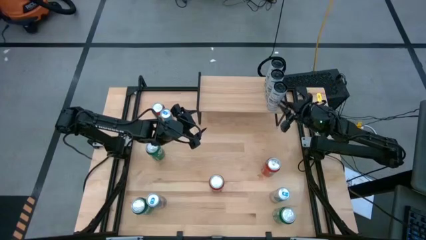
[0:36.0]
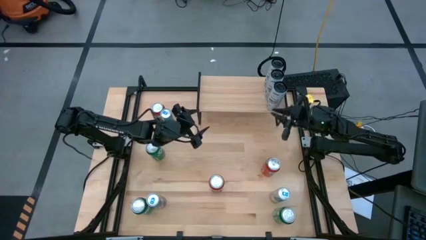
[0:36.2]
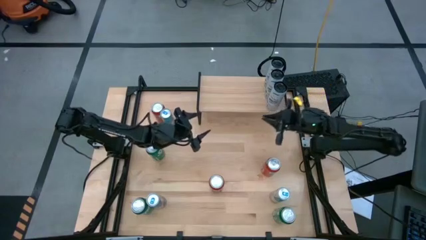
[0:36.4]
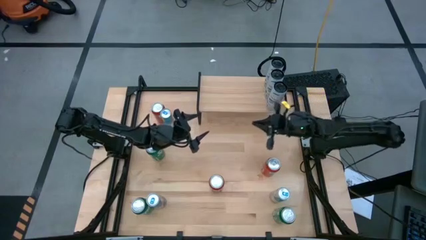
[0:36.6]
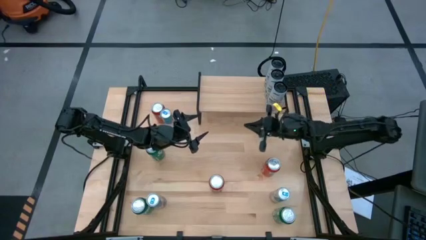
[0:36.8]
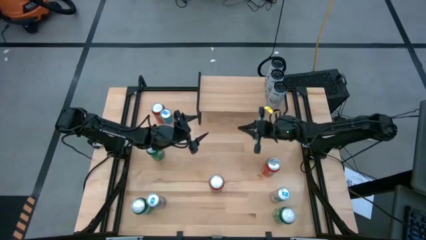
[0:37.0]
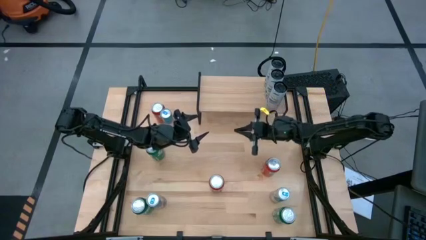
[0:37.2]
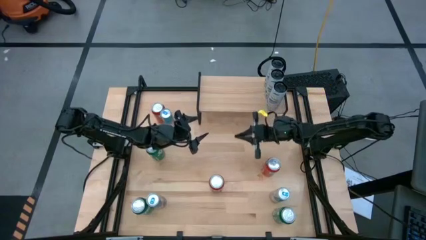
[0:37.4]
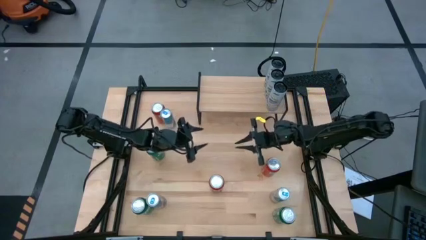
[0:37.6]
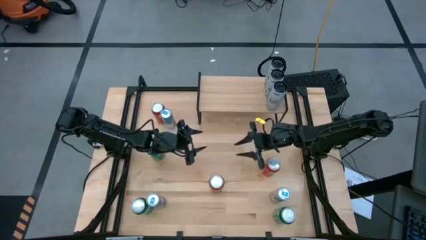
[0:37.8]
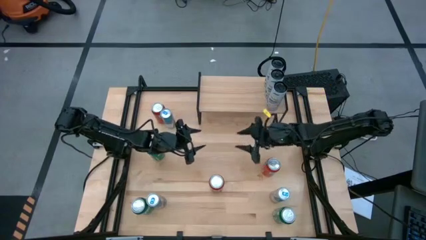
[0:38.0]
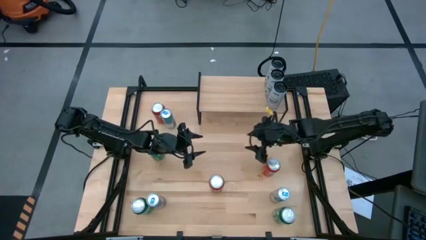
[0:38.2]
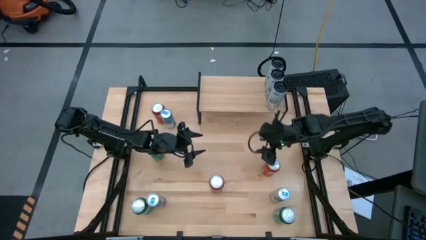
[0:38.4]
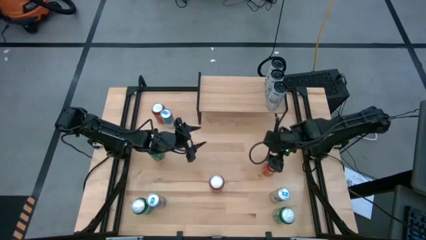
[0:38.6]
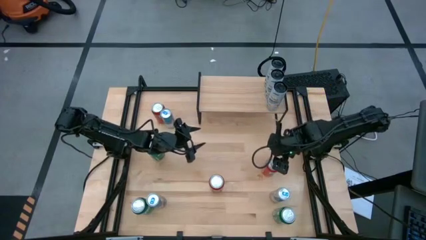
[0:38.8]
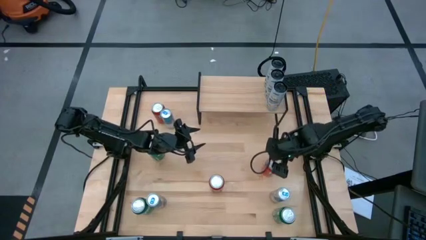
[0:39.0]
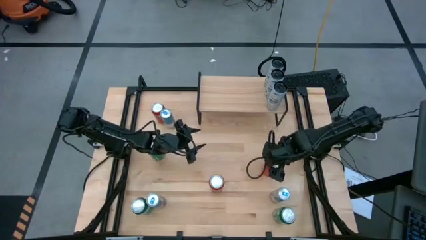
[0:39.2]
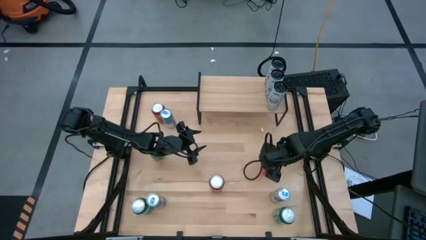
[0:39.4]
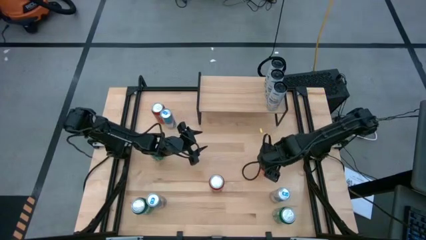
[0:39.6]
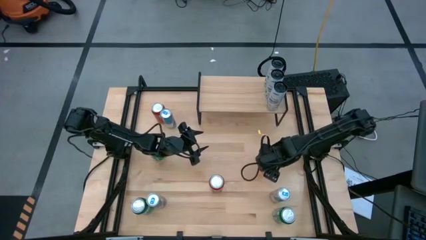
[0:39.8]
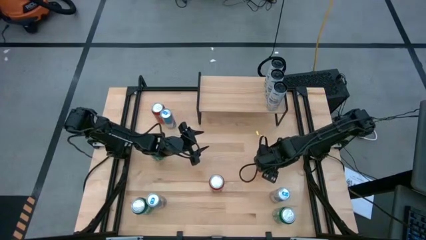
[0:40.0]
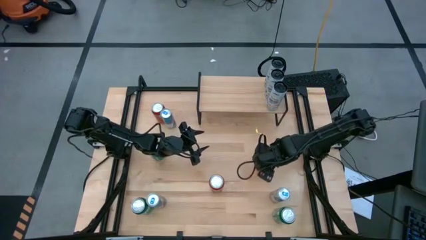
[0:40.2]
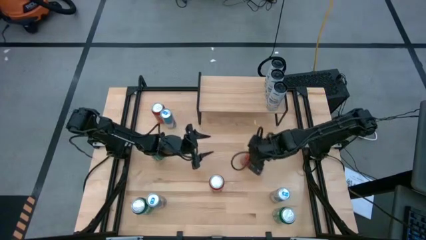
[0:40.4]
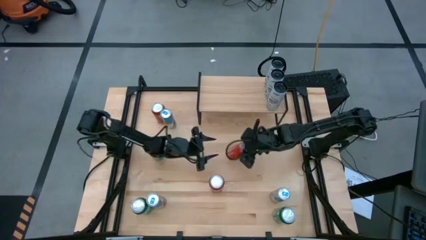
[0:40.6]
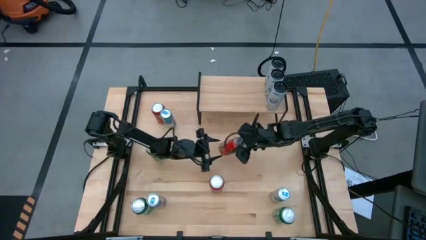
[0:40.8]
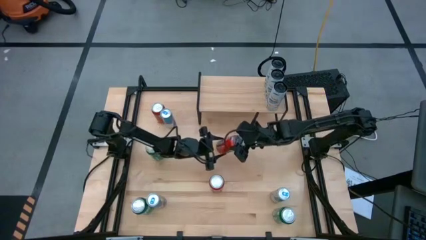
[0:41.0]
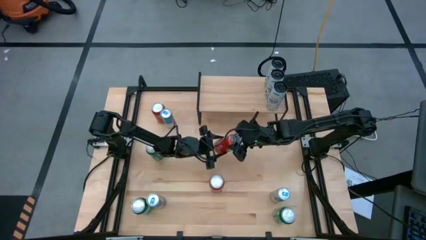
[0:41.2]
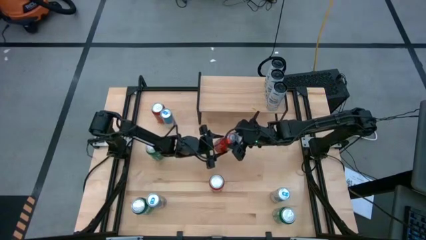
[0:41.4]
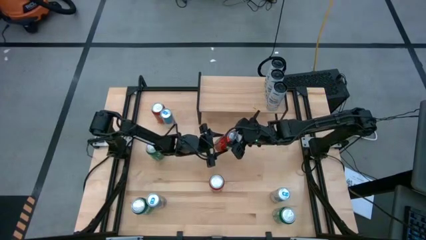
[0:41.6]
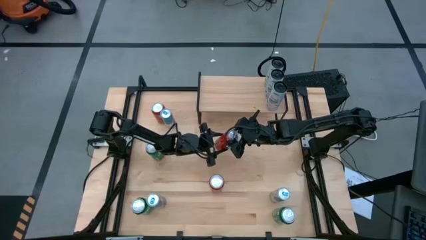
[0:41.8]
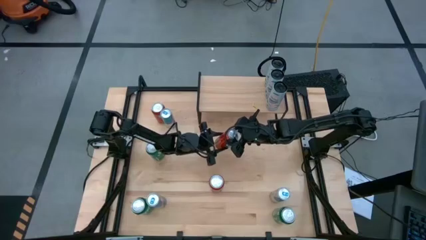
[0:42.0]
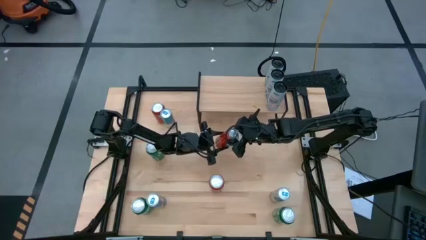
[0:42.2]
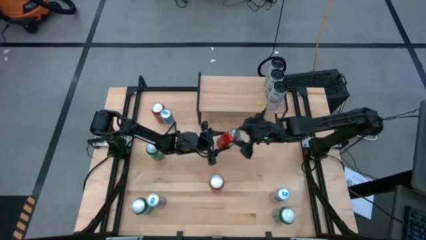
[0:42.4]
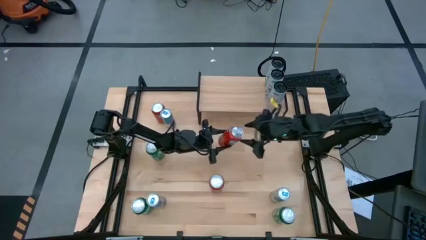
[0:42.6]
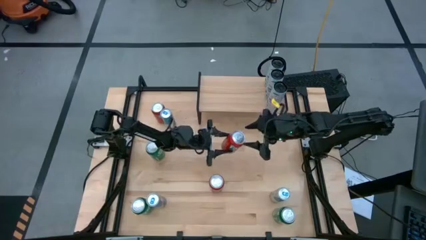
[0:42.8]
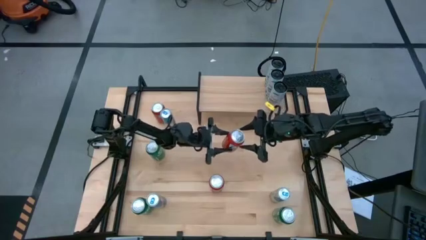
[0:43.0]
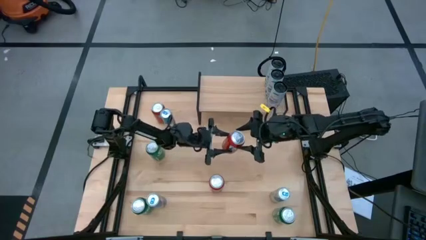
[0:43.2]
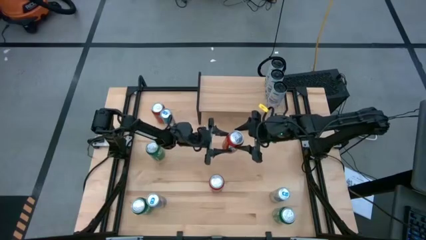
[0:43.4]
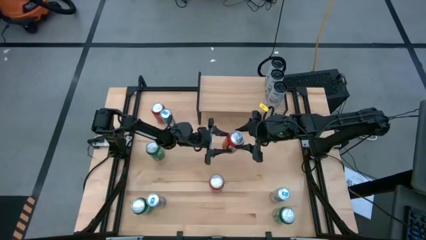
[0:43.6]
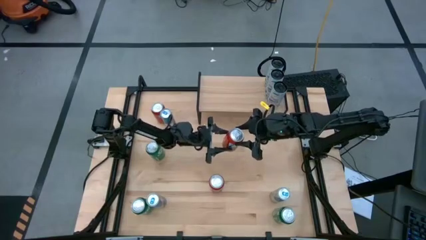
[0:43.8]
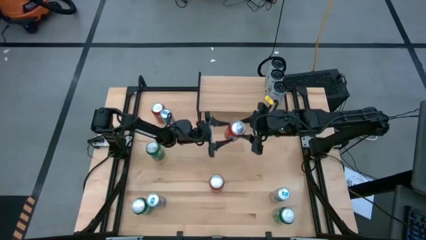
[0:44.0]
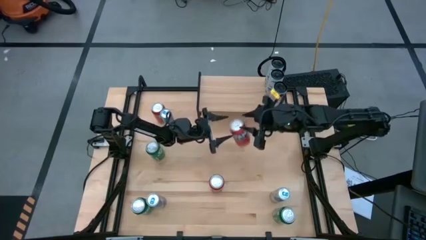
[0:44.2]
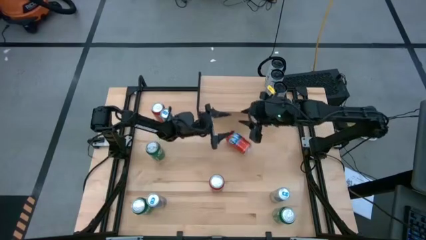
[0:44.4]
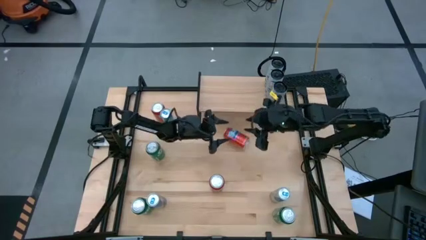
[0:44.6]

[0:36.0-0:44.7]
Task: Place canned beverage on shelf
Put the bottom right red soda can on the shelf

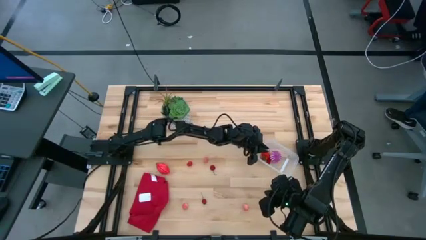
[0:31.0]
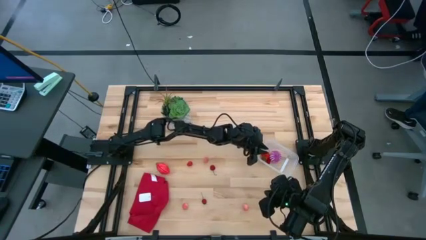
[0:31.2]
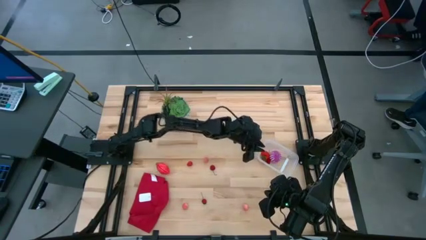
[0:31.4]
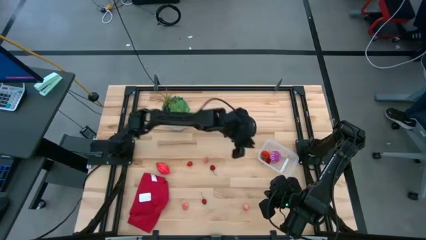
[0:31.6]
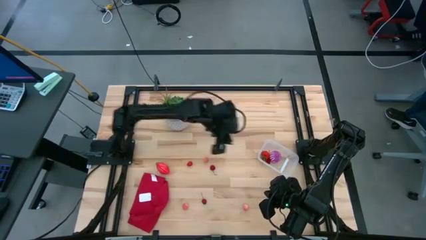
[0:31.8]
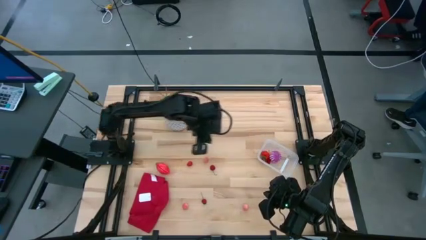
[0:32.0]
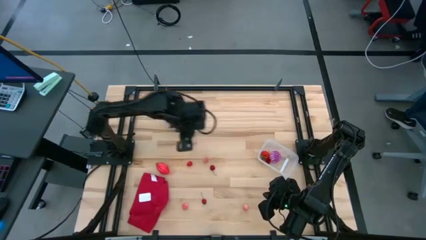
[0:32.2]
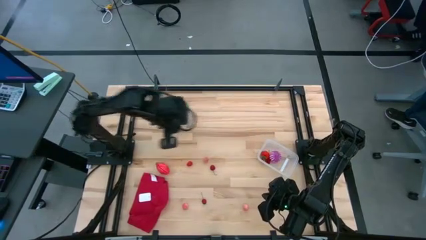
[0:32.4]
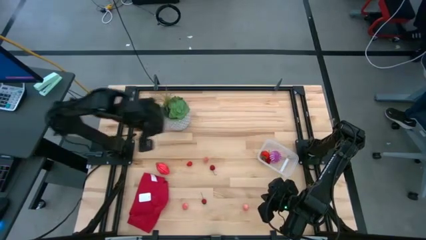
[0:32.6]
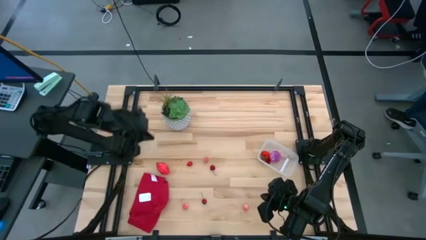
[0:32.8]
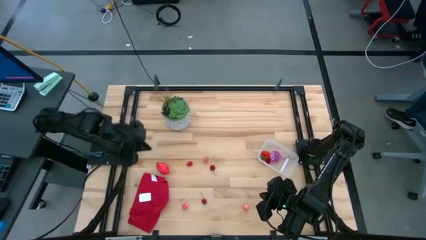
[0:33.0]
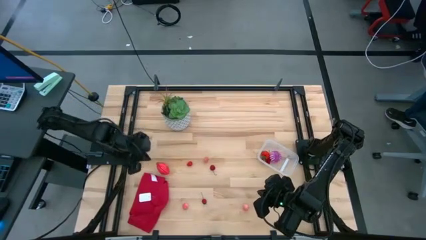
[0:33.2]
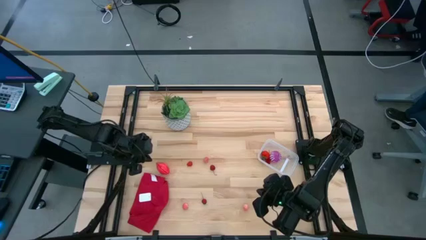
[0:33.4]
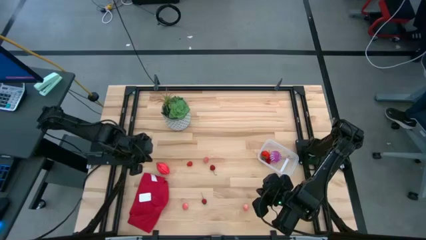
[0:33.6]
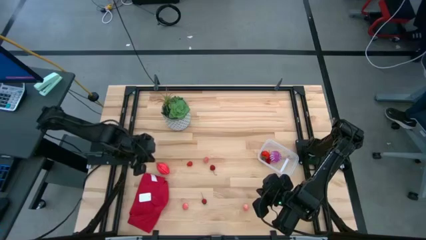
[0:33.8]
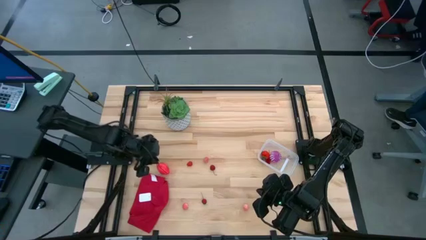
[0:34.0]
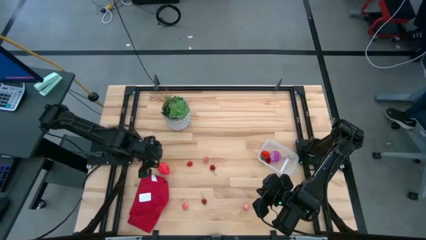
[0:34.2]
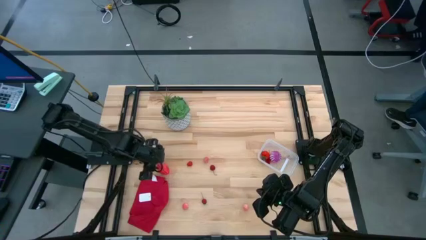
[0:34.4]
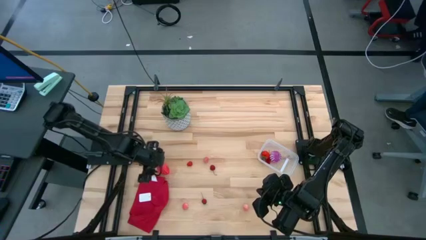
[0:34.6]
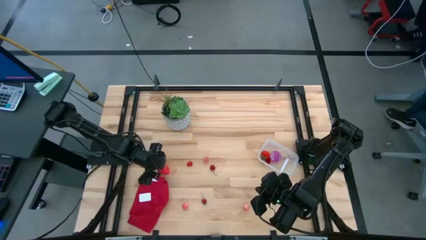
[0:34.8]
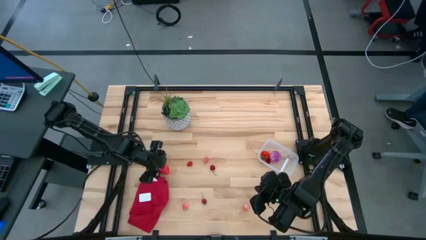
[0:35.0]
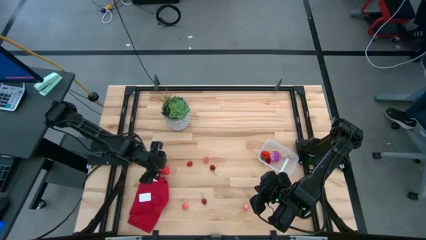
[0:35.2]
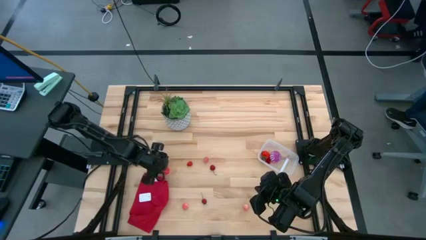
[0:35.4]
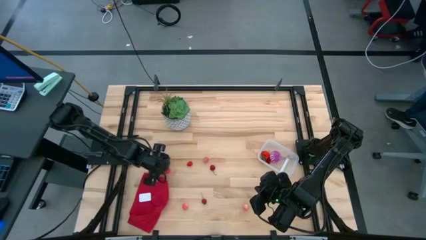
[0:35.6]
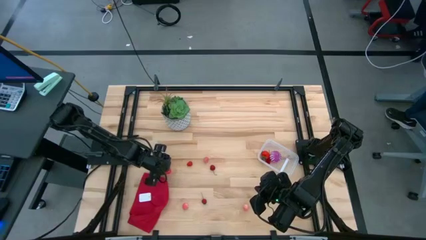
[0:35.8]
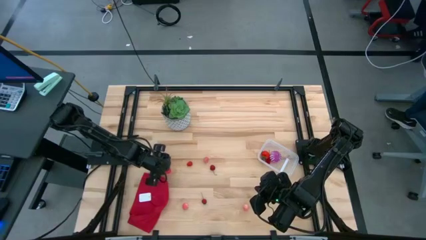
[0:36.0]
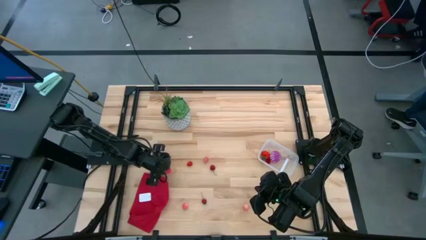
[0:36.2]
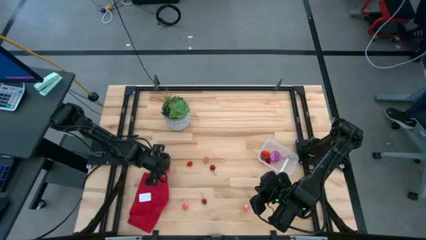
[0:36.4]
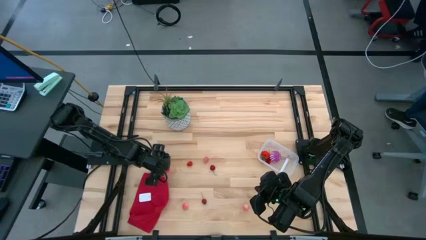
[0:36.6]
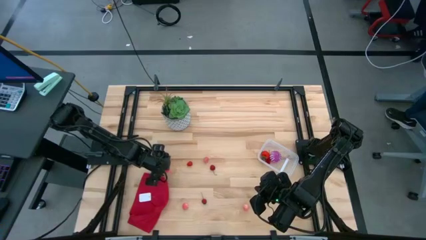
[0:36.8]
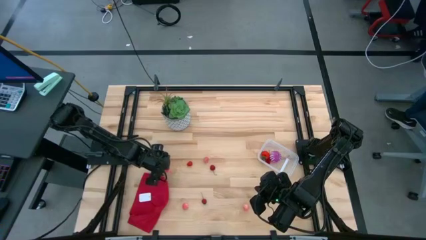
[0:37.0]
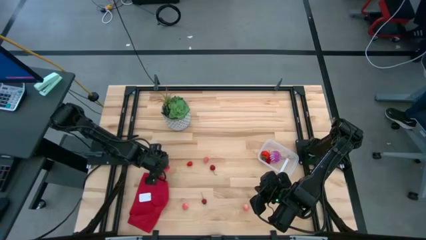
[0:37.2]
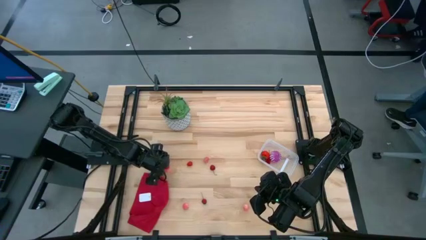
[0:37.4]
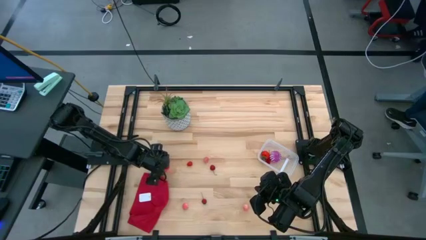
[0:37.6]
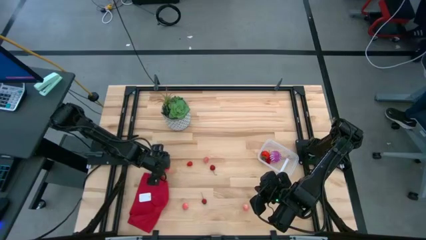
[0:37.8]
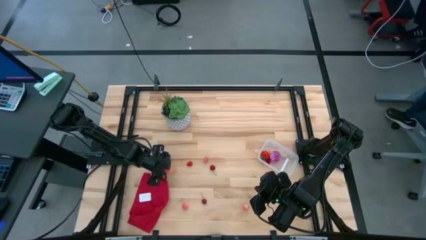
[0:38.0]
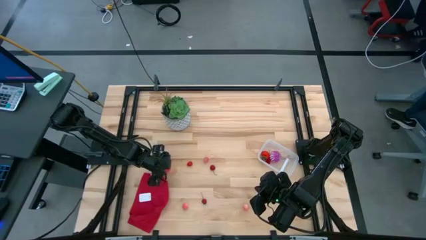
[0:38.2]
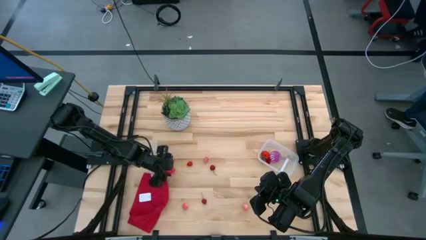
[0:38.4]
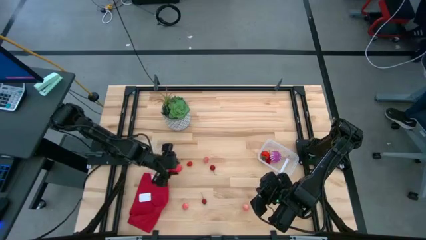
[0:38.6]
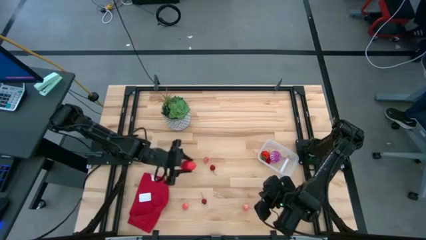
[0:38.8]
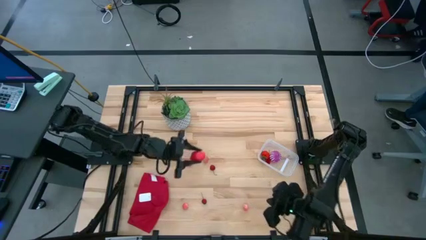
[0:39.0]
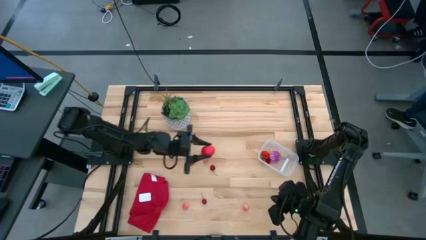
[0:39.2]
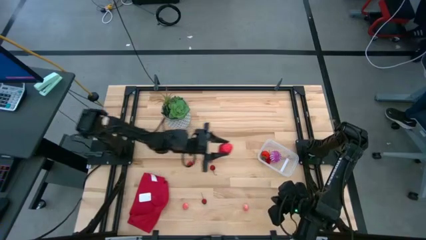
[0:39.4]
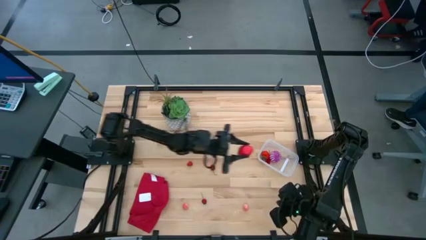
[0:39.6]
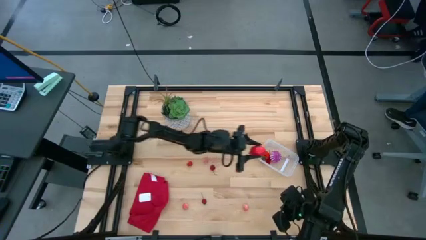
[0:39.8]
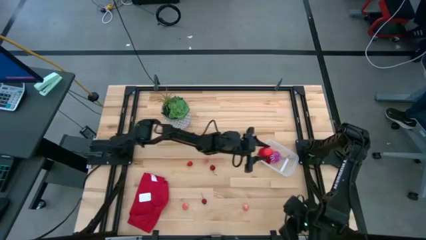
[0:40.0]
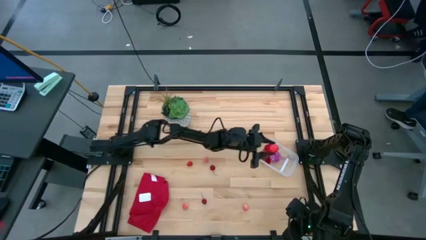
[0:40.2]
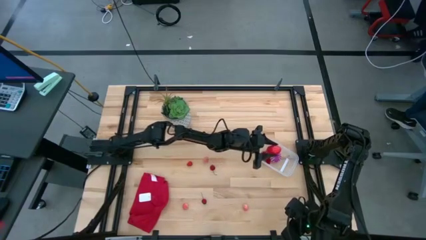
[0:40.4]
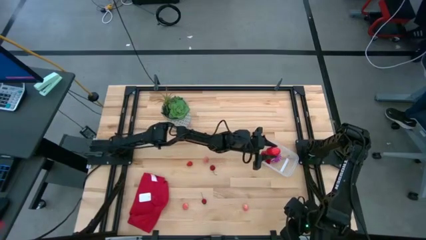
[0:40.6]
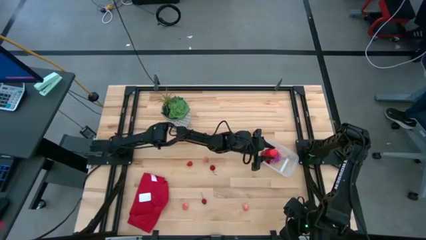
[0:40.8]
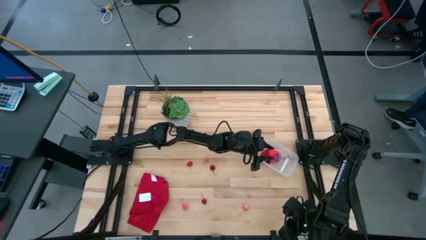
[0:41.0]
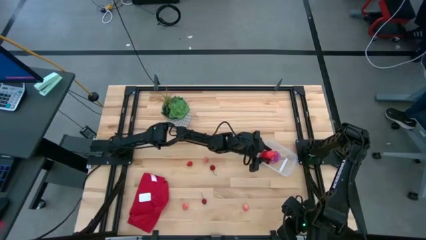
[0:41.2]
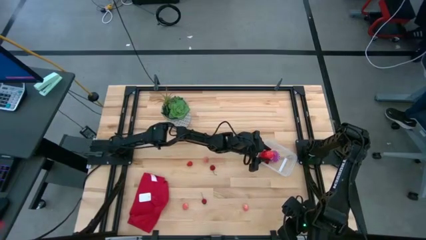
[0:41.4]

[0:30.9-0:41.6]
Task: Pick and placing Produce into tupperware
Put the red dragon fruit into the transparent bin
